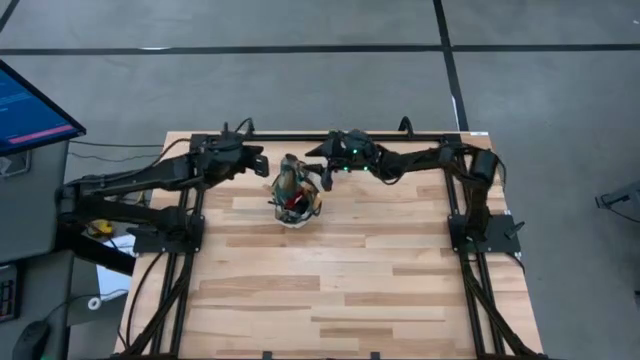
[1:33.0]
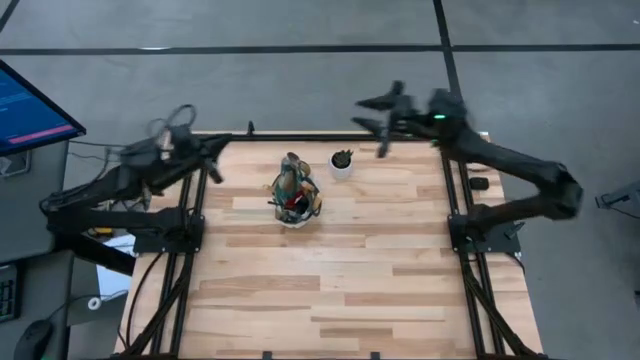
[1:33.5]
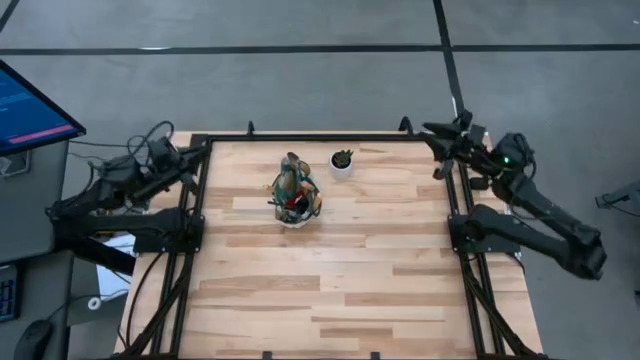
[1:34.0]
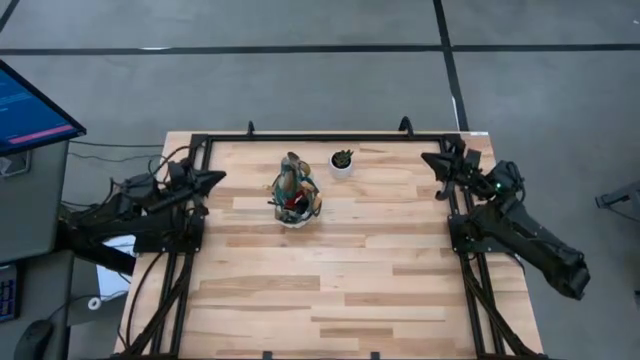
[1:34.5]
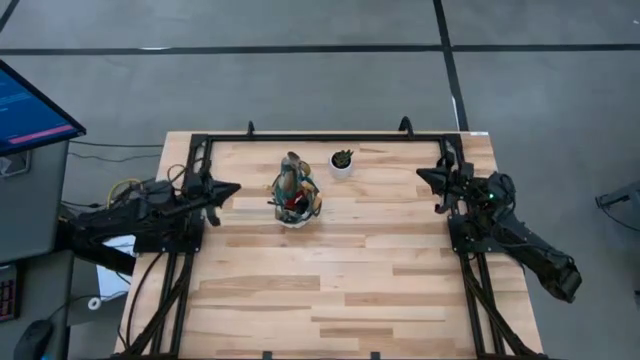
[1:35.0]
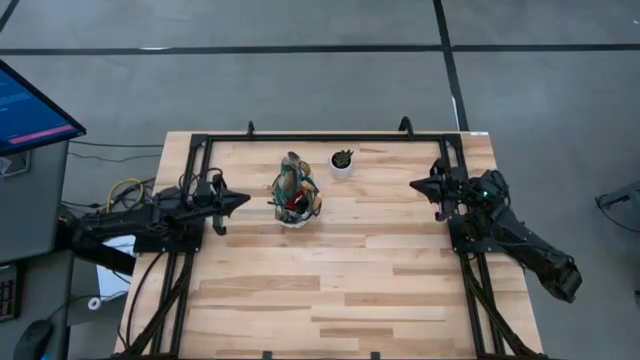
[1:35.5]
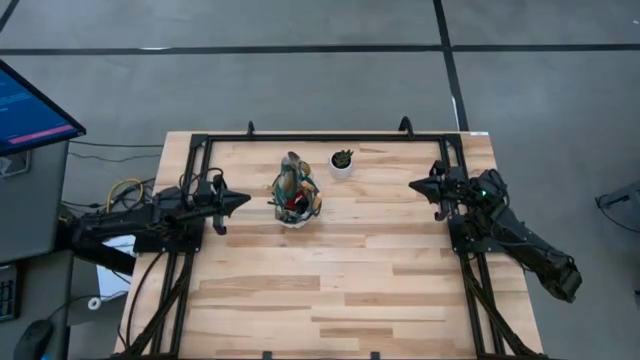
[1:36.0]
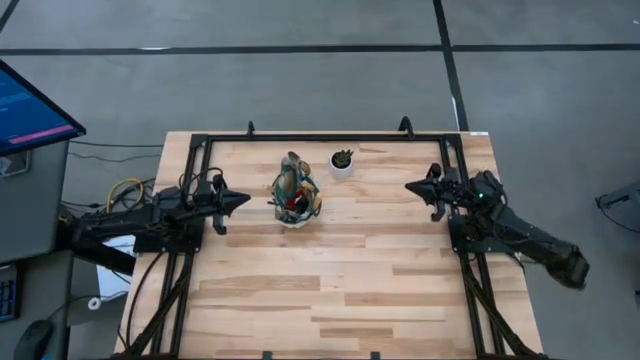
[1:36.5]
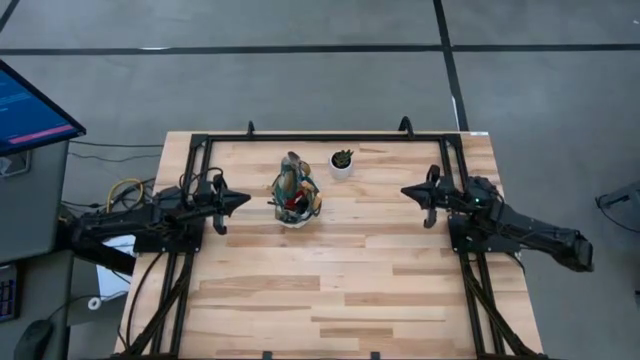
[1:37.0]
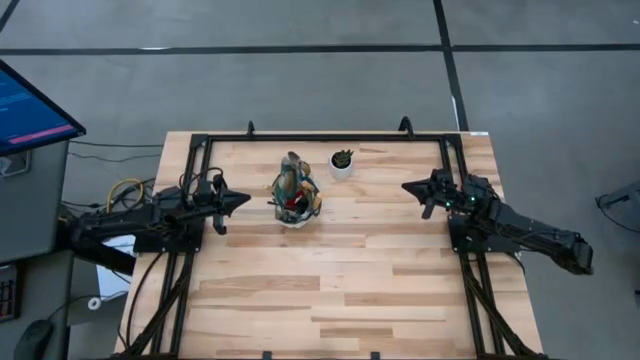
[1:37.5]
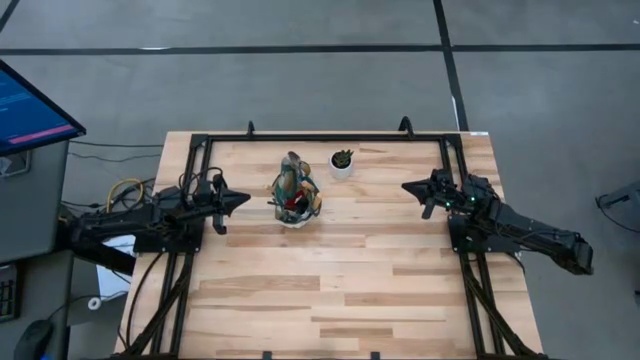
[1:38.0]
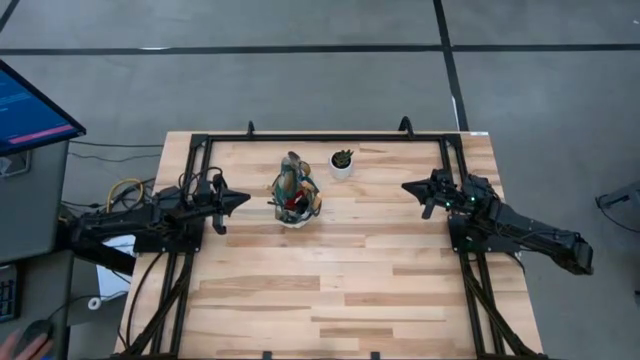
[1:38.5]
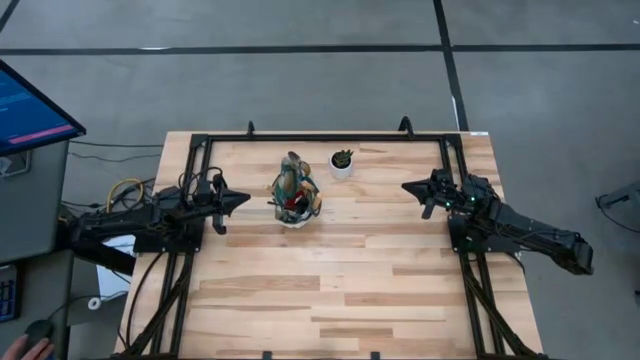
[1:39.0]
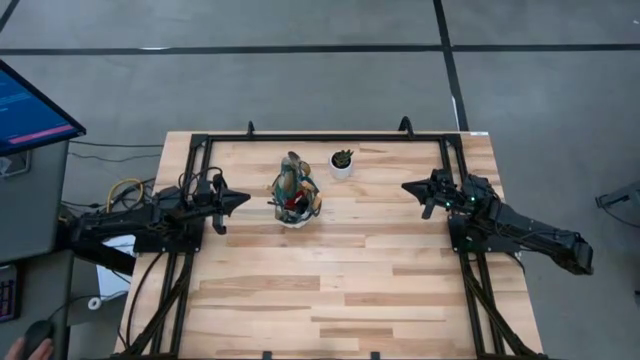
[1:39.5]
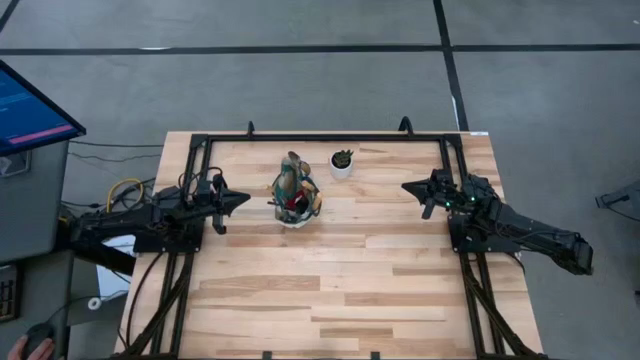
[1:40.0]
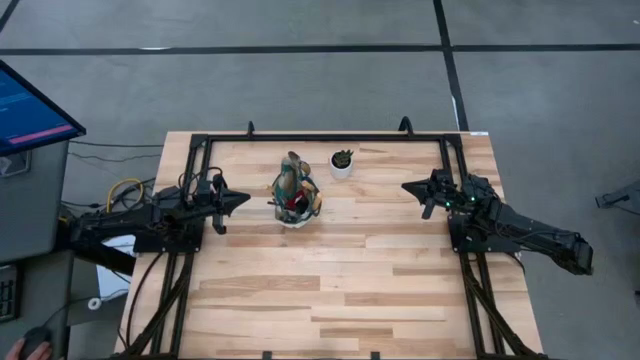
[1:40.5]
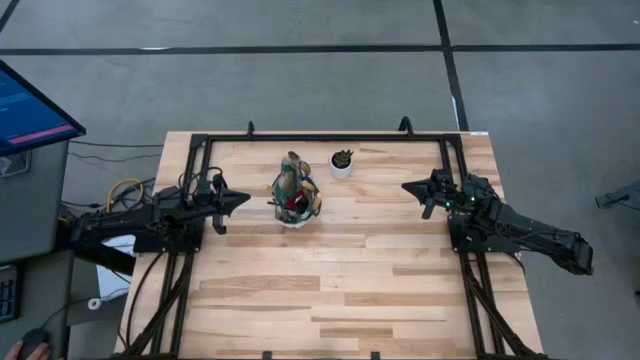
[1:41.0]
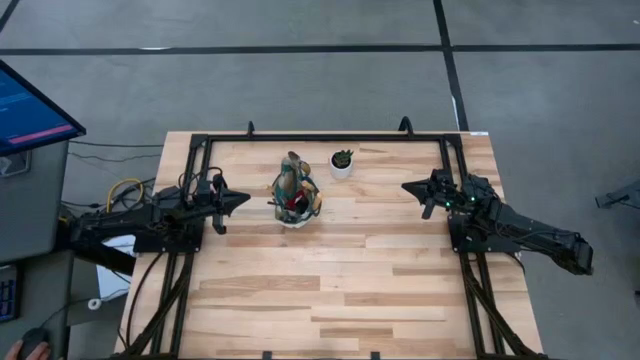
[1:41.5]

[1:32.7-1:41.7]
Task: Pick & Place Garden tools in Gardening bag
Return to Home Position

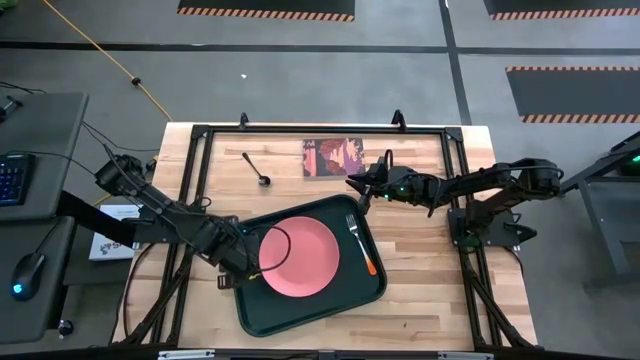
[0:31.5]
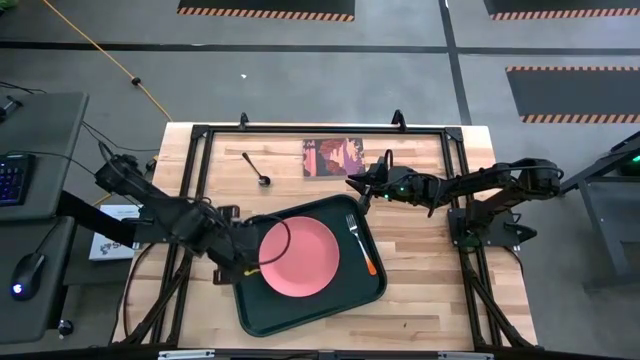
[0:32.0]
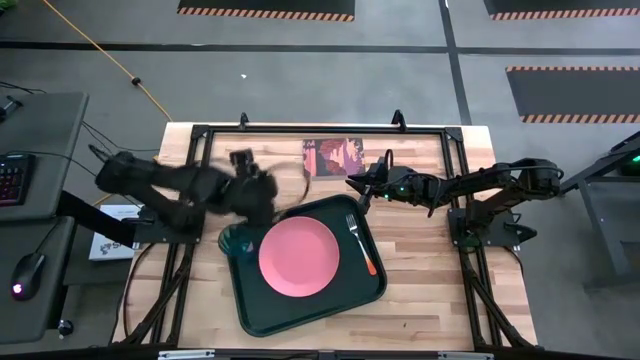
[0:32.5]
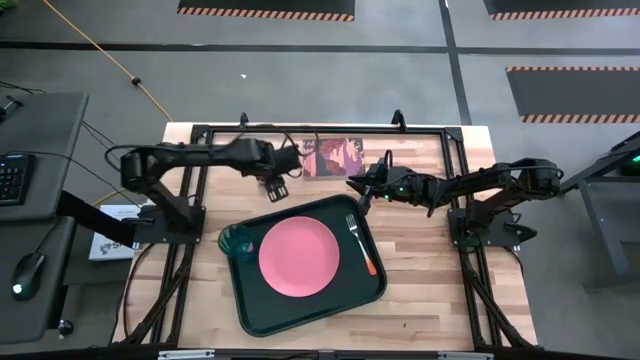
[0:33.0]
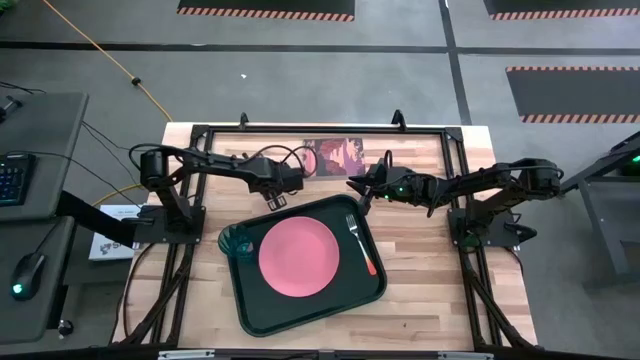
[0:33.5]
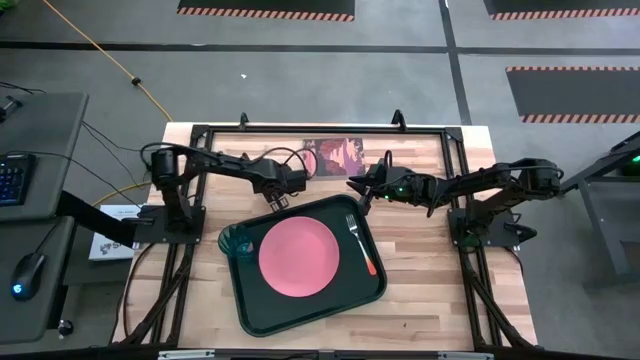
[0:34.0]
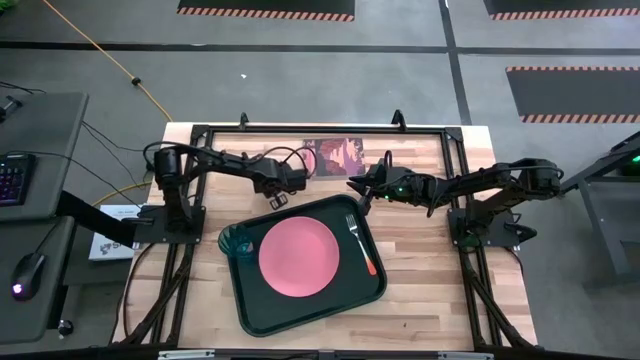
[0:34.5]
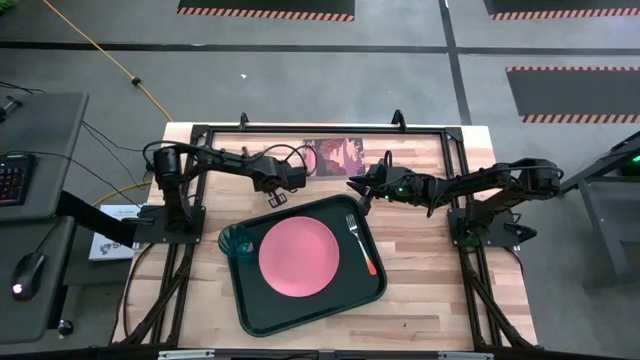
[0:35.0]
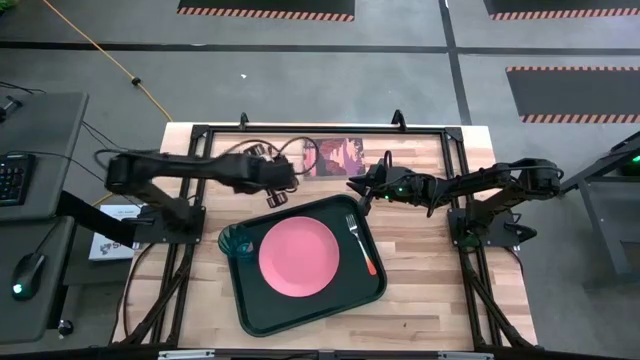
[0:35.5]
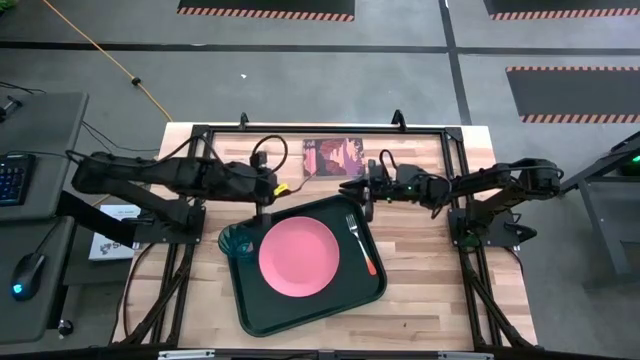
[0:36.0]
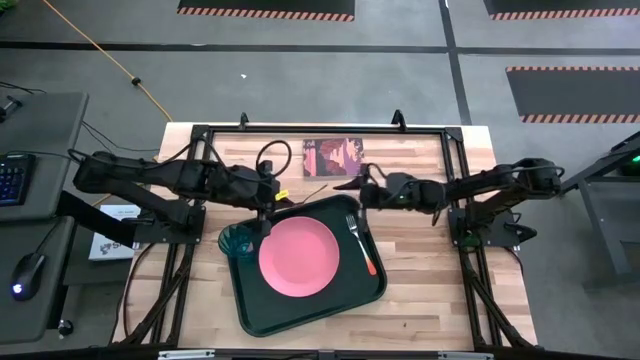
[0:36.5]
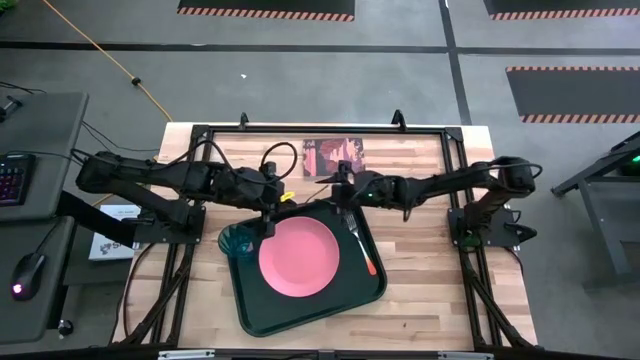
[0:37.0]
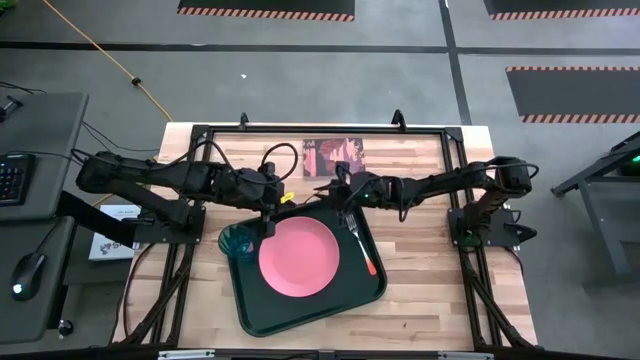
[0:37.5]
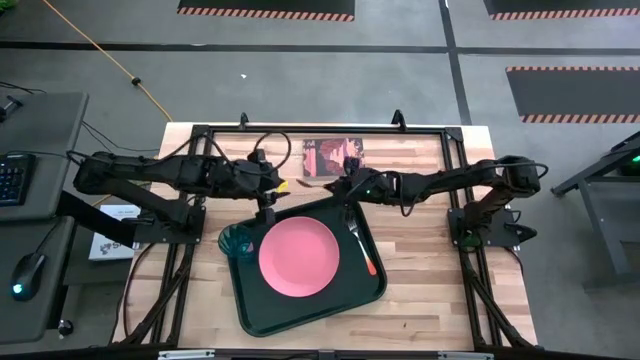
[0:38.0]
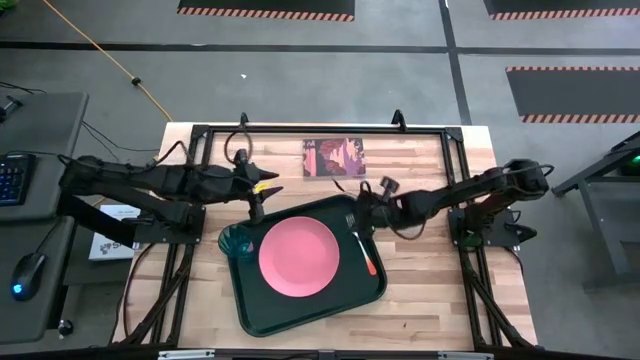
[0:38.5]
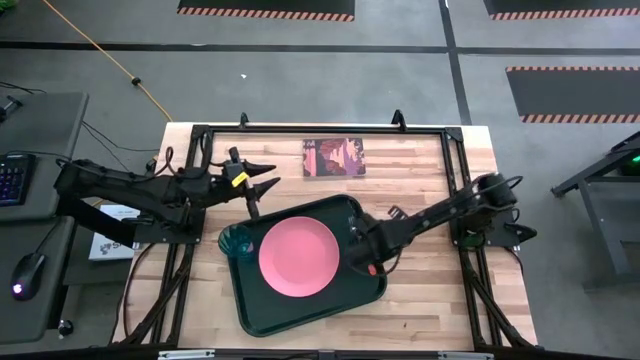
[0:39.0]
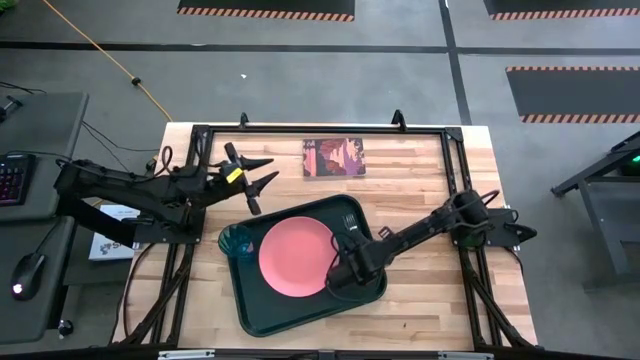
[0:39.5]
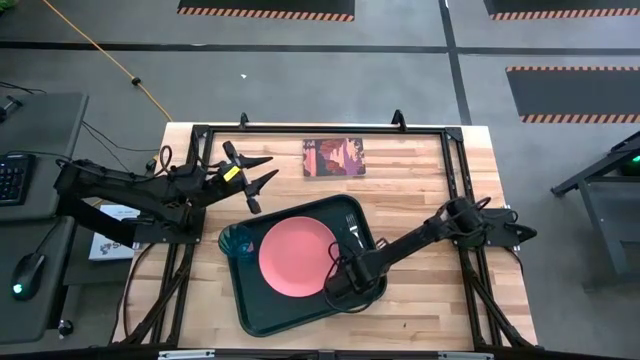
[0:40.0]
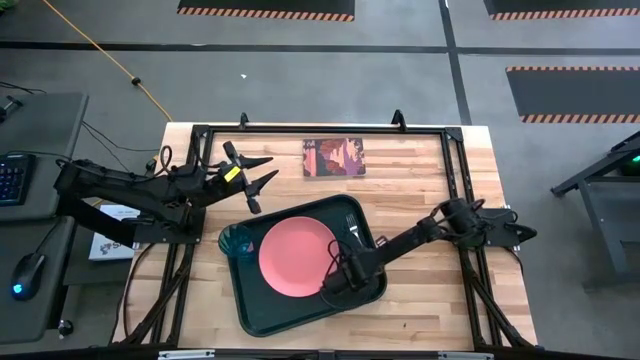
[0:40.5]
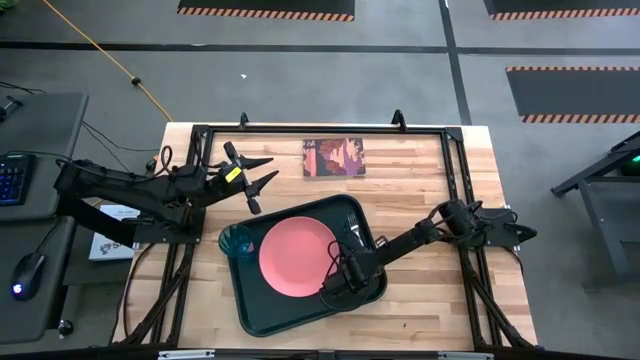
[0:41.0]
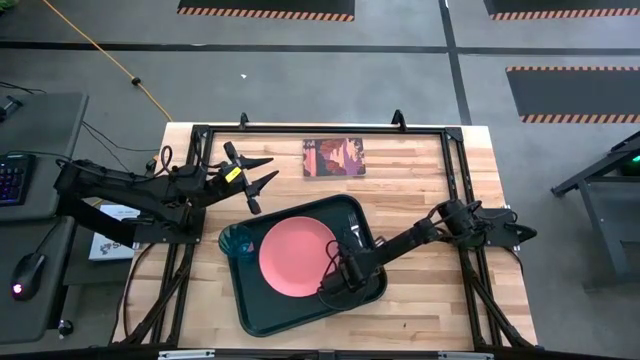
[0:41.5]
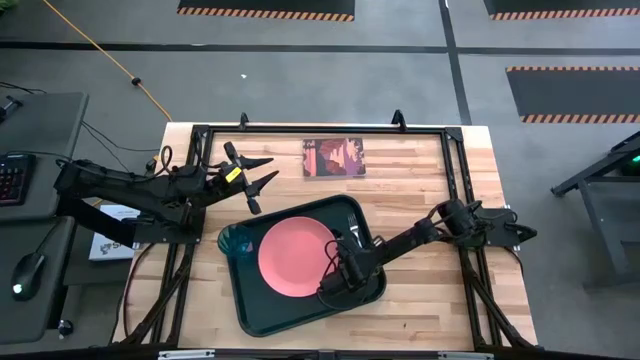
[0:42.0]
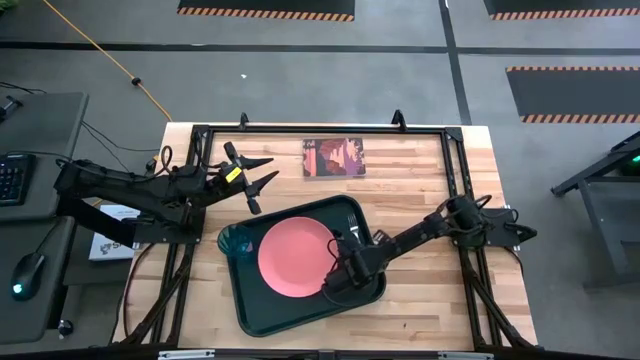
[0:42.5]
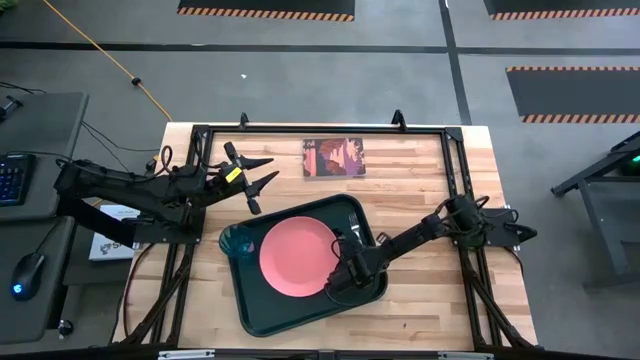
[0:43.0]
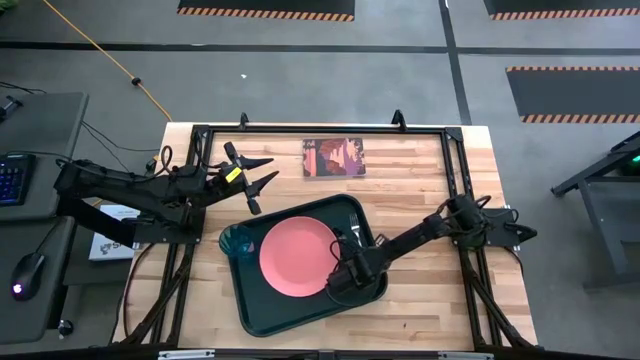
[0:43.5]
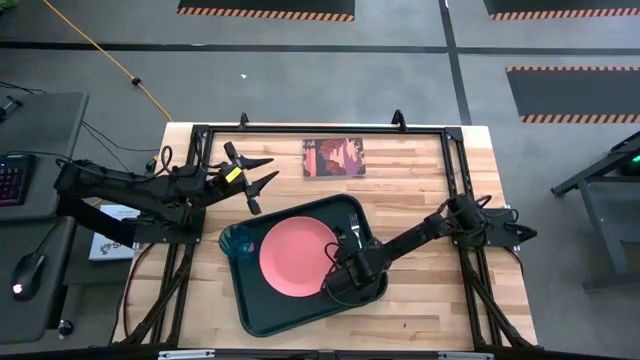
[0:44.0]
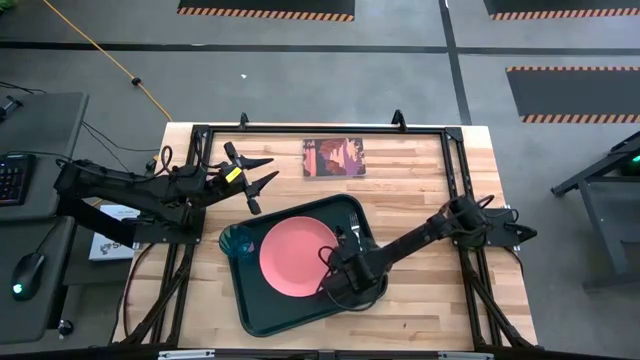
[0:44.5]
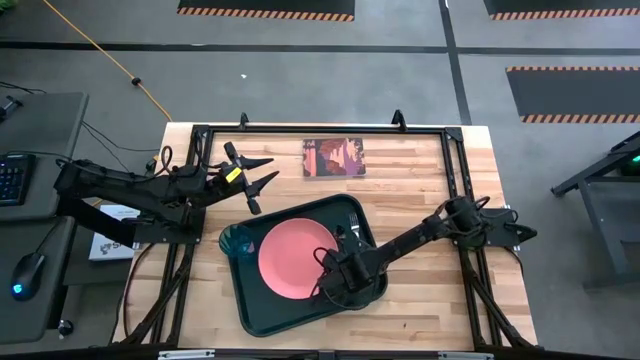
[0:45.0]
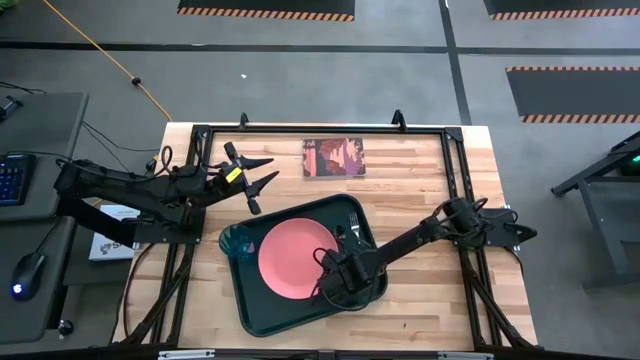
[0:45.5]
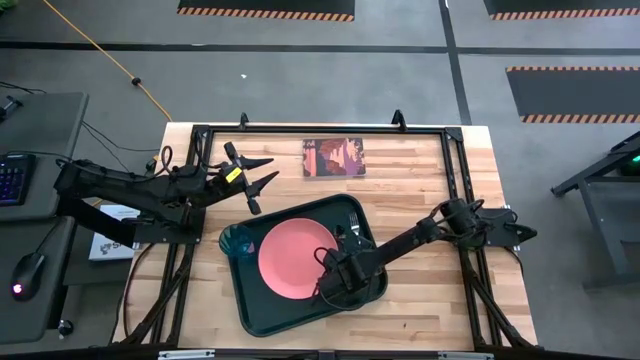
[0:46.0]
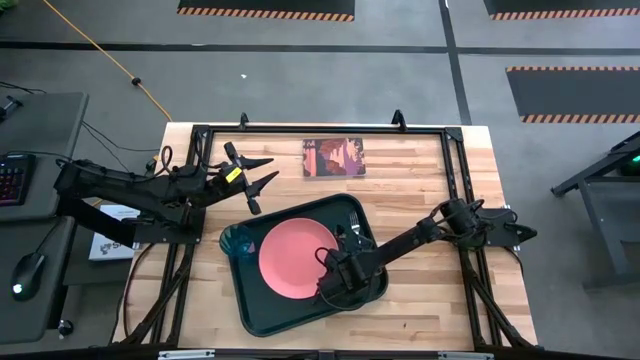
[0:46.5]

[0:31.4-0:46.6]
Task: Pick and place plate/cup/fork/spoon on tray
Put the black spoon on the black serving tray to the left of the orange fork
